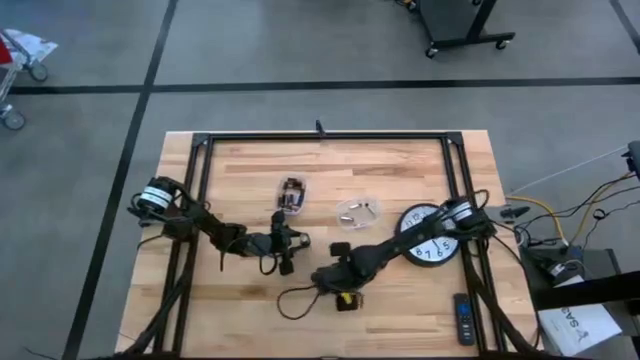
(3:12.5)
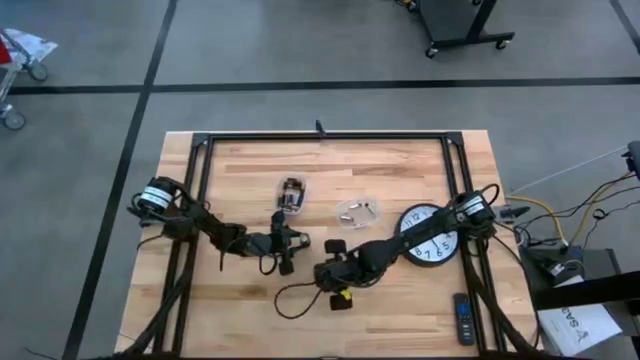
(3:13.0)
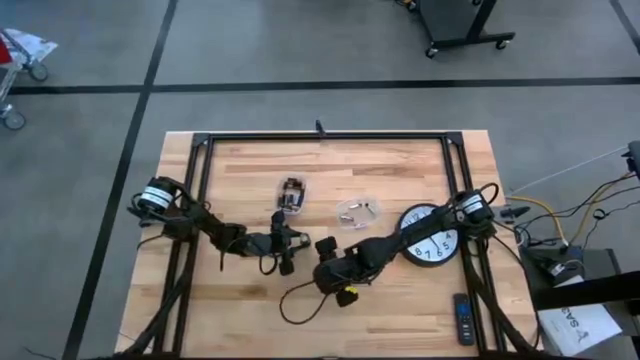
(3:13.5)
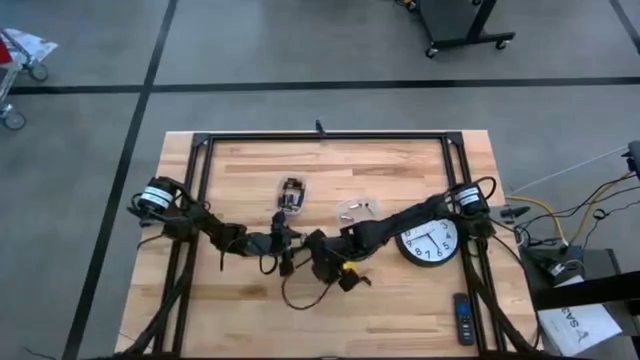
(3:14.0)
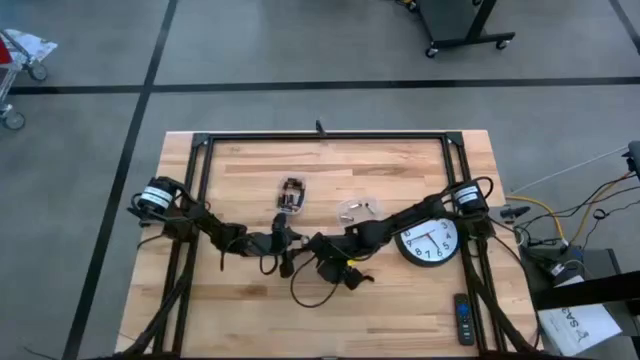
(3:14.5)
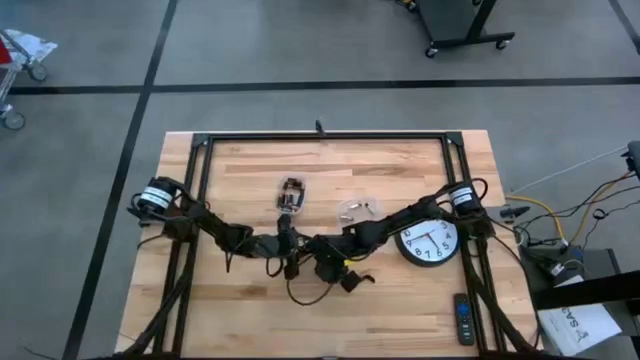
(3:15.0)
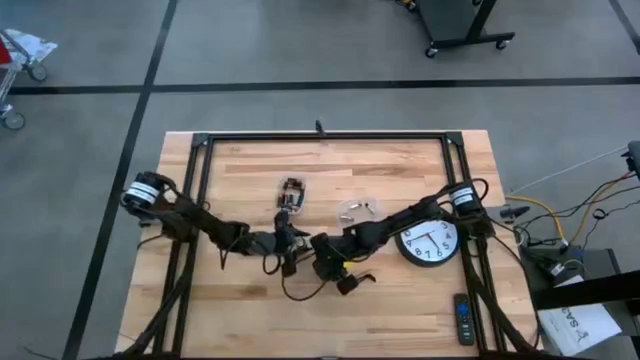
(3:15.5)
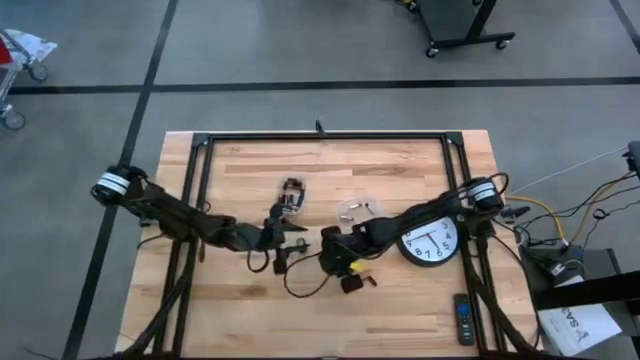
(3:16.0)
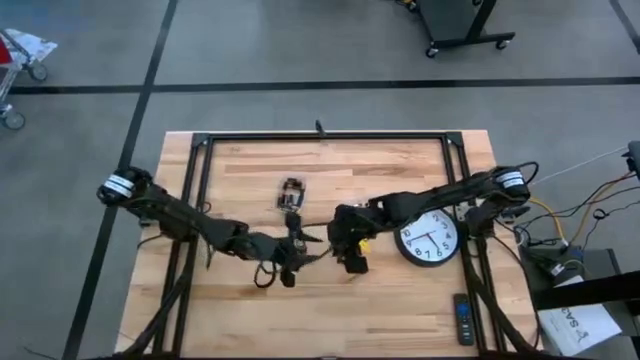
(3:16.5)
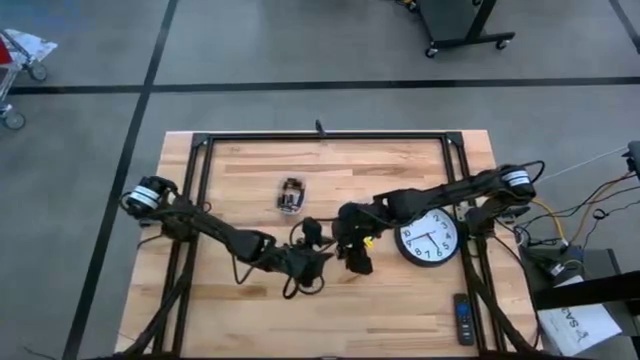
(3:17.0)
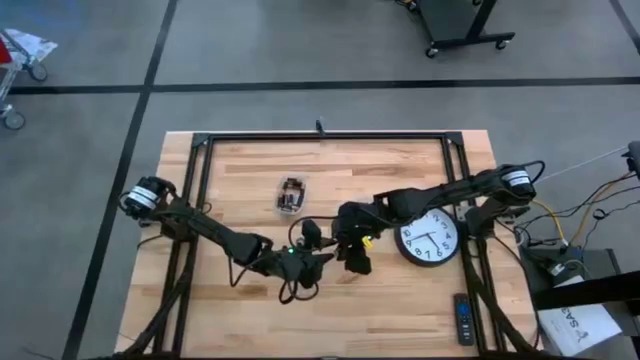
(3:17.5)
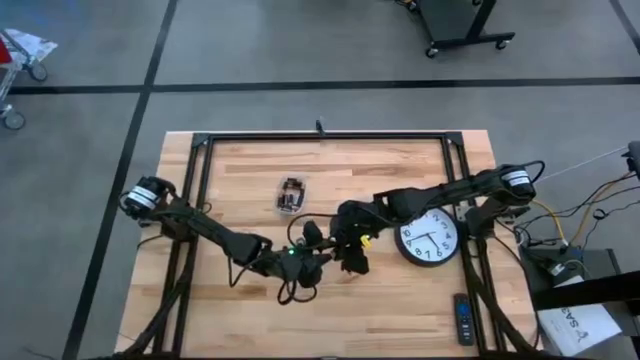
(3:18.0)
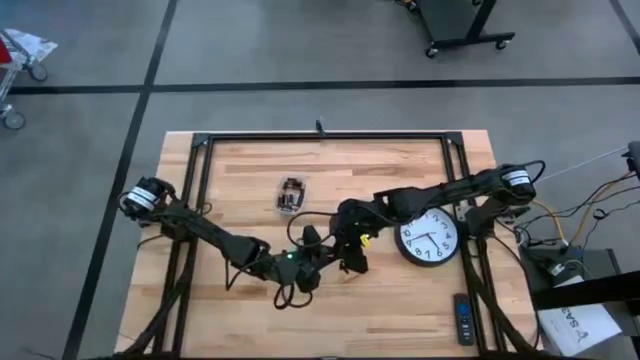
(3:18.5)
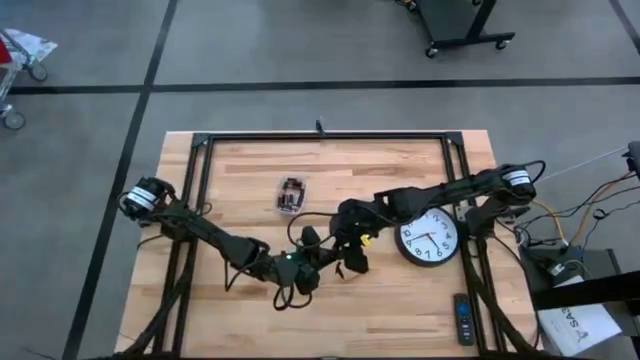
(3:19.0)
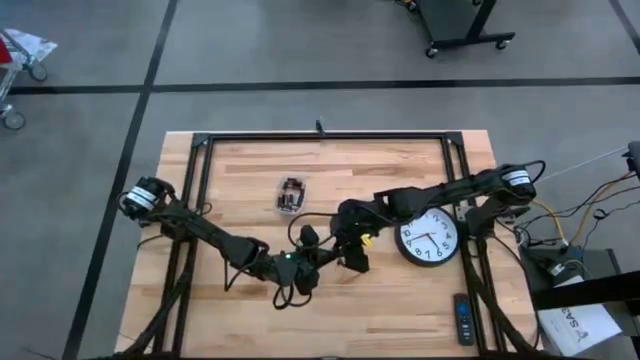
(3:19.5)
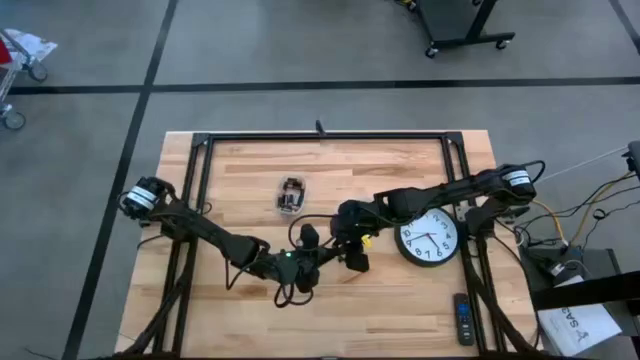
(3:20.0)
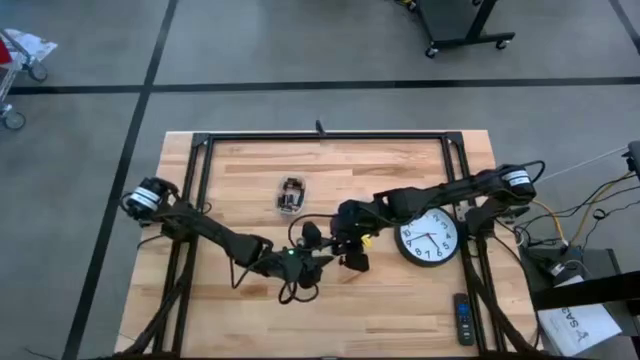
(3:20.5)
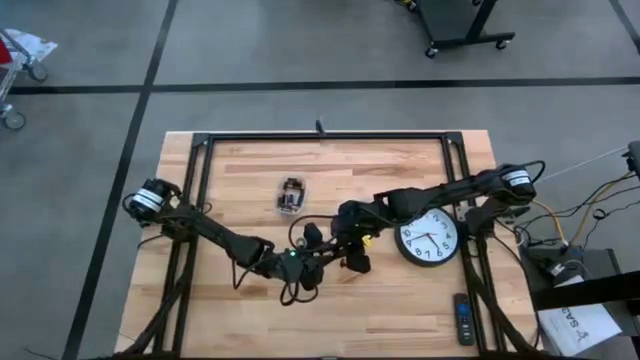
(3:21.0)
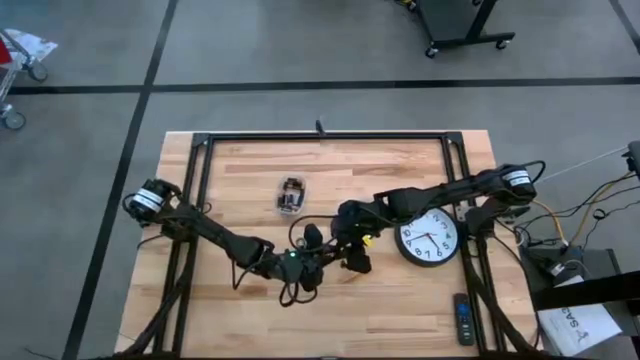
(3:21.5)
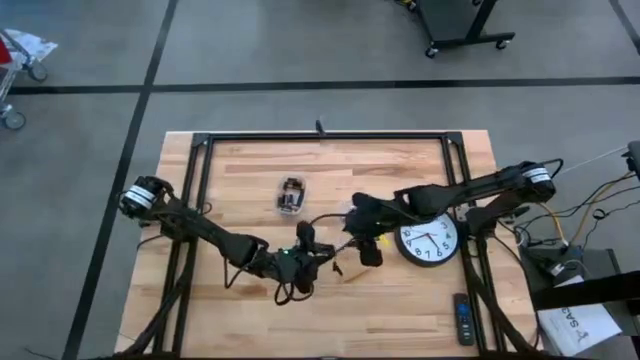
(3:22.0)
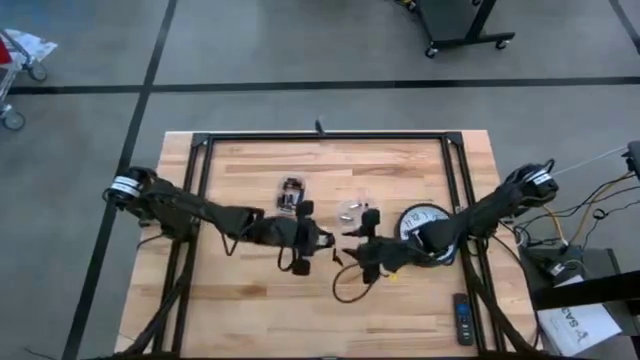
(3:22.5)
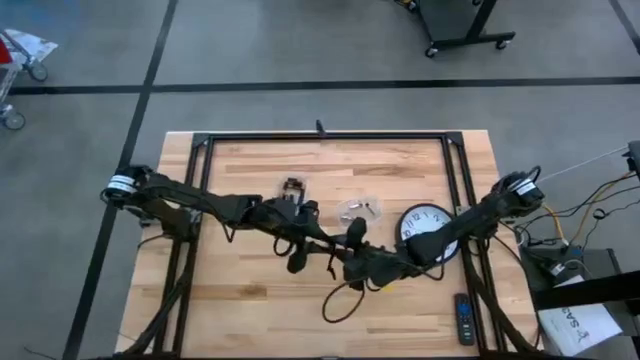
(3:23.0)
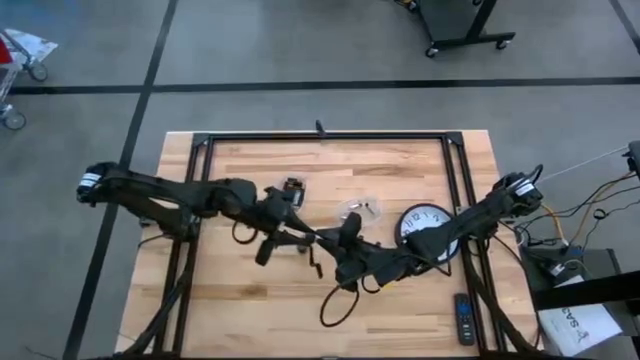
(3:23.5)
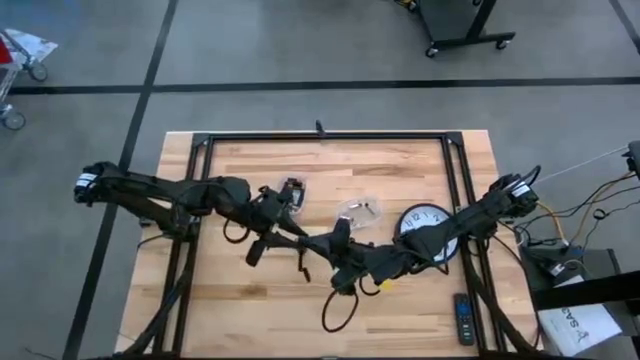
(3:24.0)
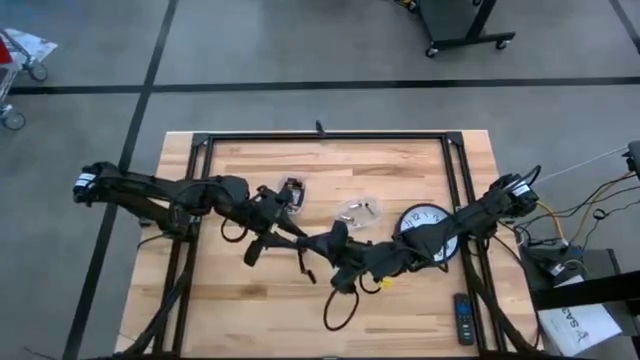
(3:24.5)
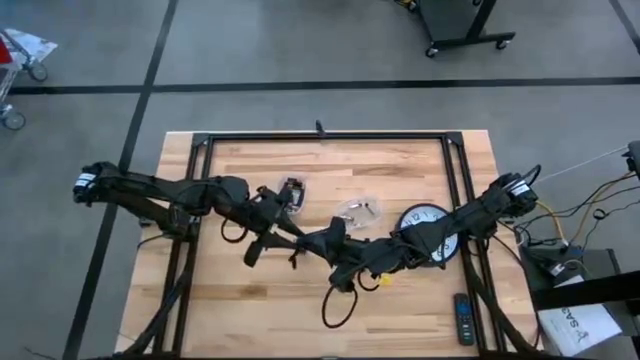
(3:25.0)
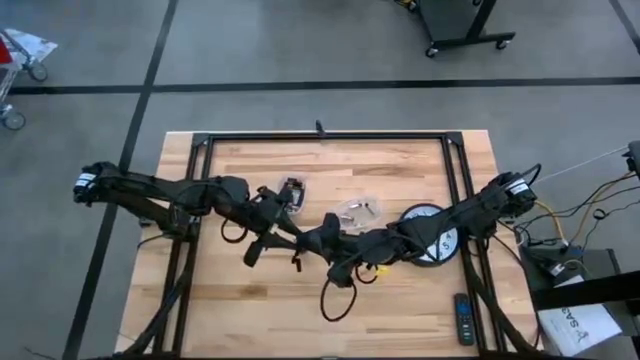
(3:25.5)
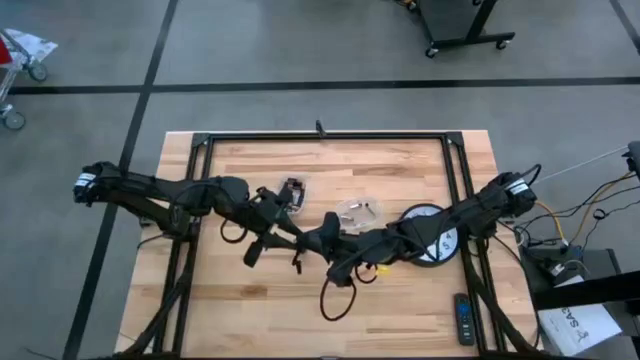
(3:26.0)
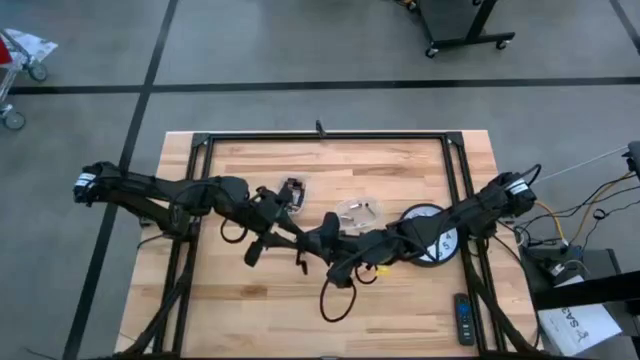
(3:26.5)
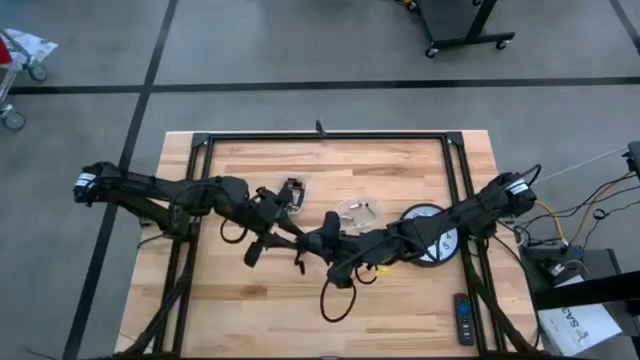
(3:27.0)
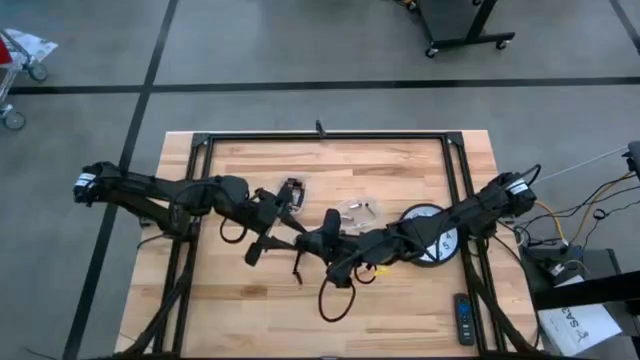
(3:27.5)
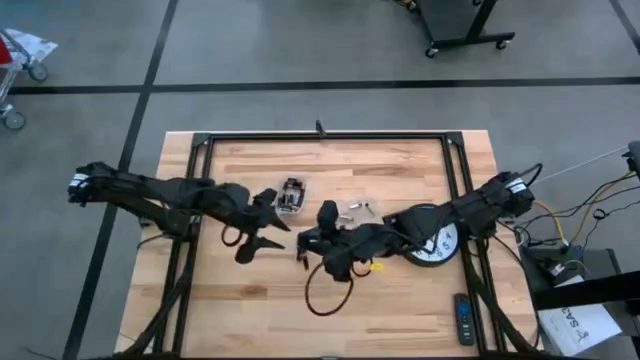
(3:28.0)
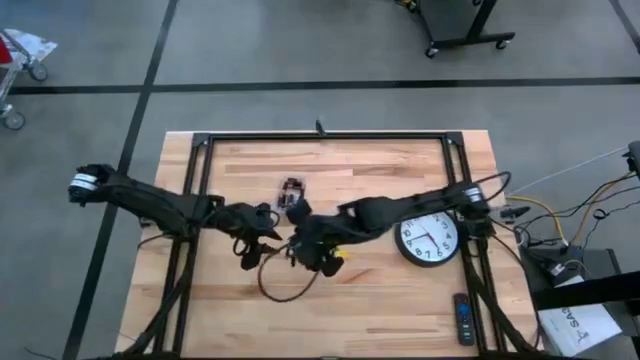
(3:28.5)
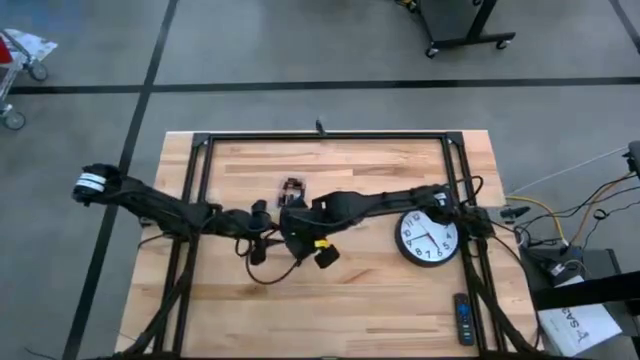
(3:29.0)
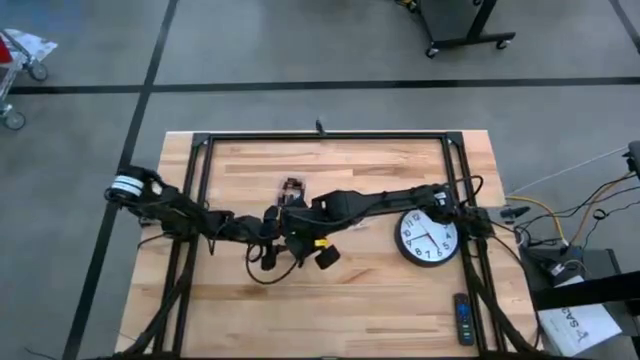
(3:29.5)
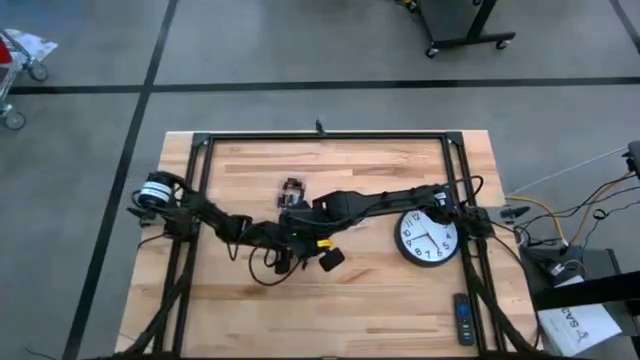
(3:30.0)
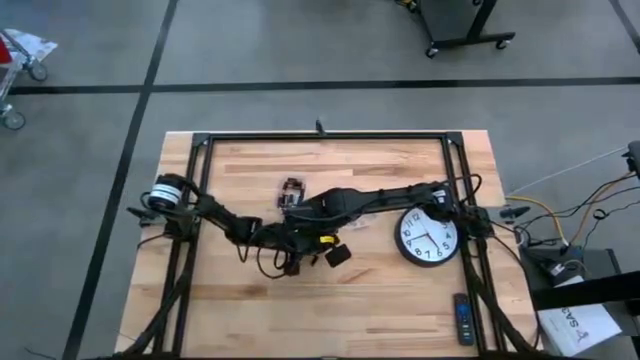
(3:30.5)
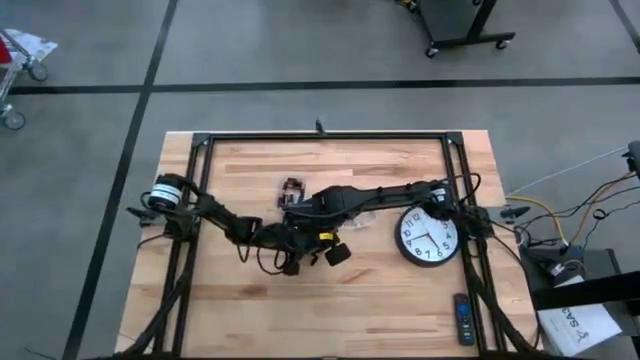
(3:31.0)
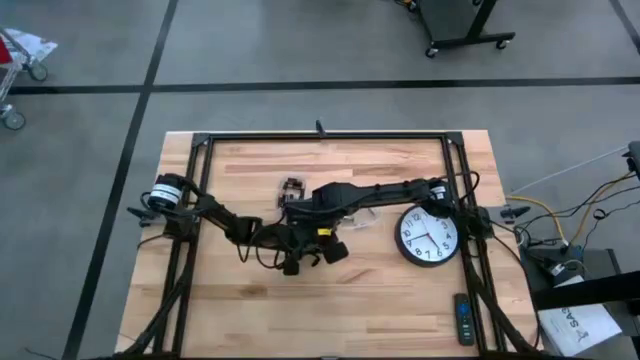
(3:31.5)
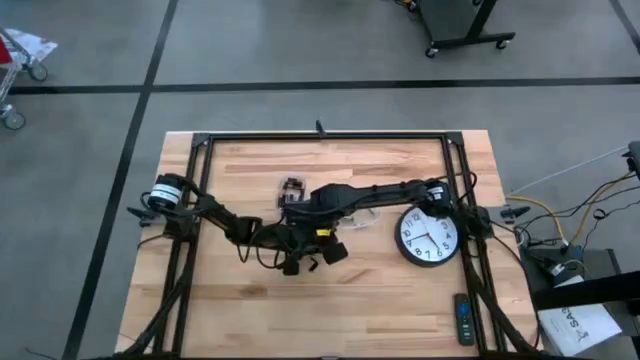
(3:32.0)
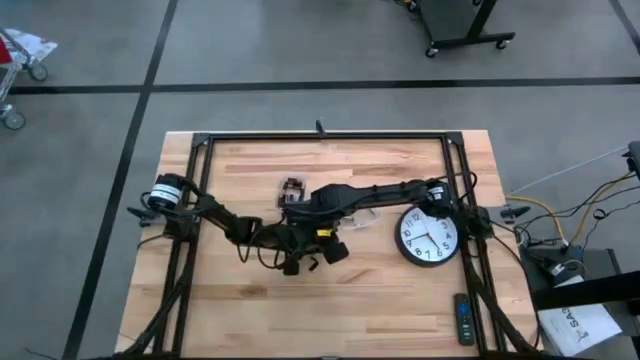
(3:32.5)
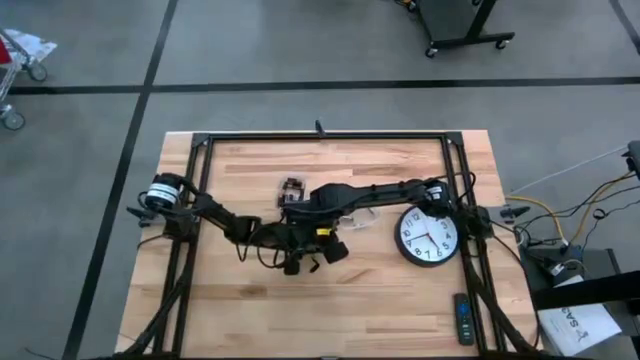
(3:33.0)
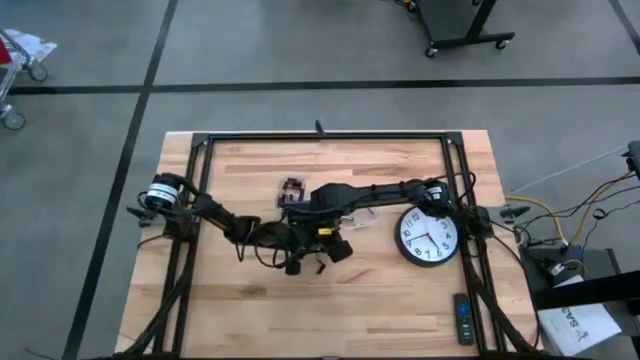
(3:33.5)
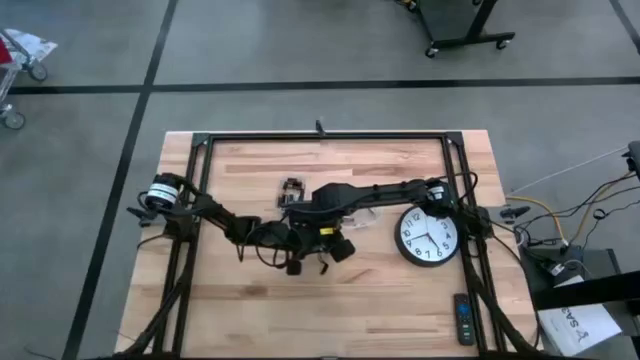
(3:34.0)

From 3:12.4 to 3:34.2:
Task: Insert battery
Close the black flashlight cover
